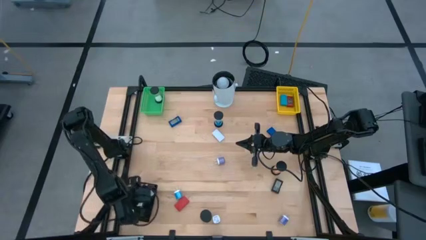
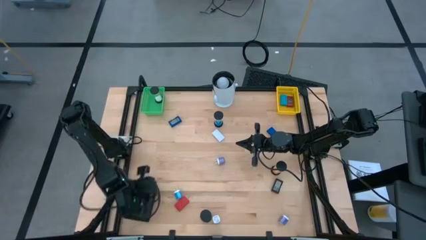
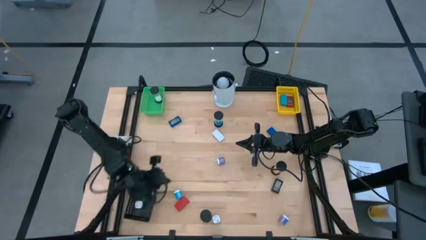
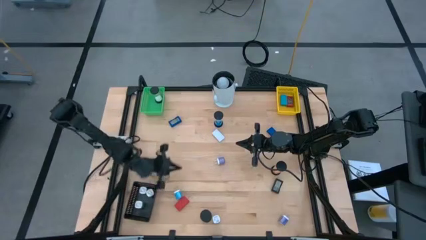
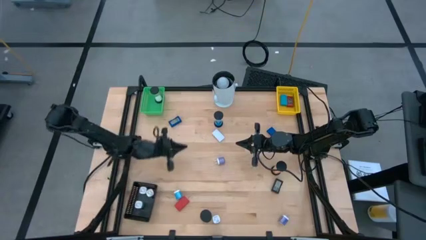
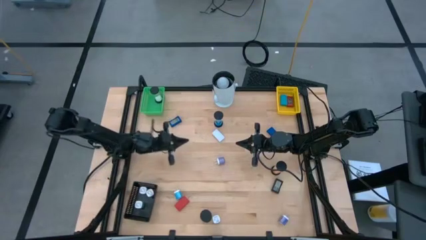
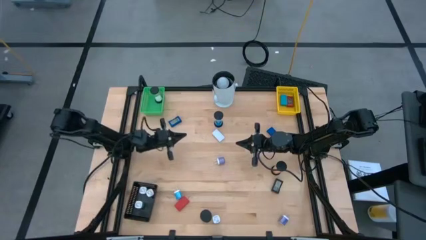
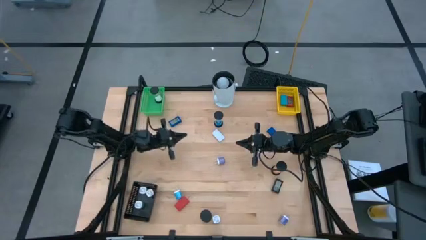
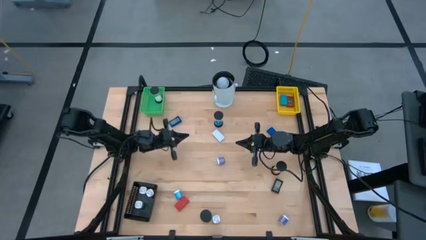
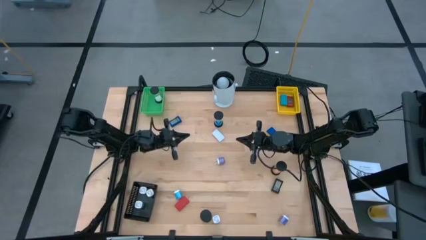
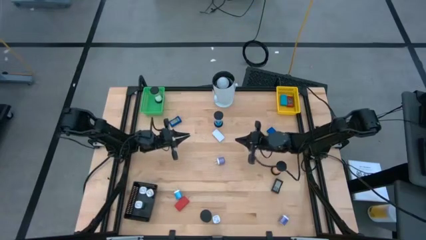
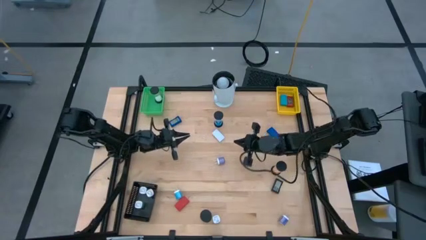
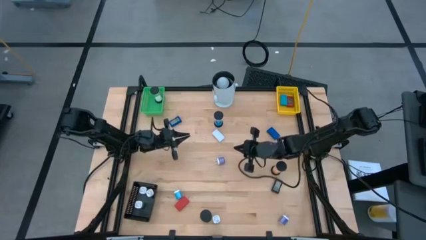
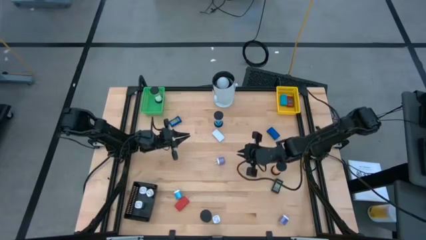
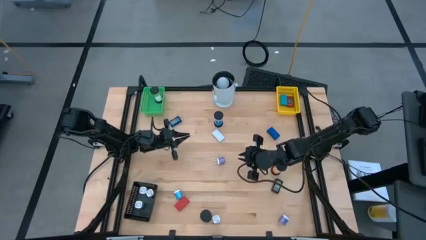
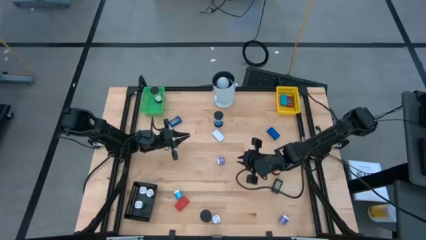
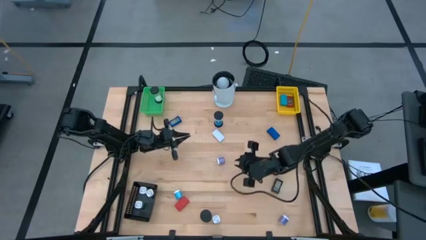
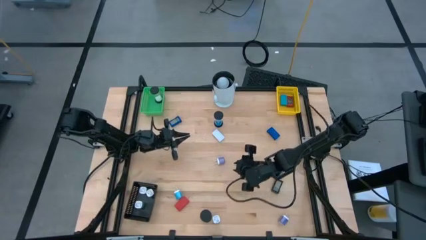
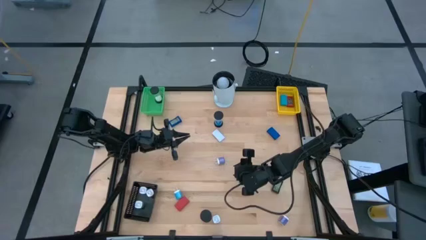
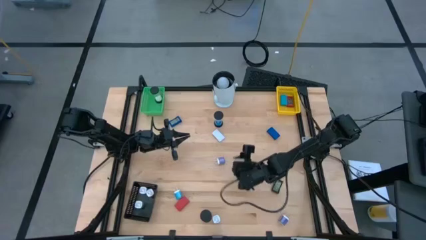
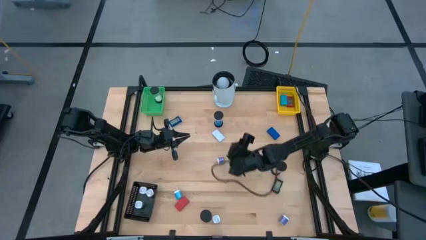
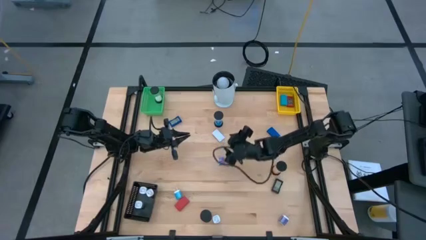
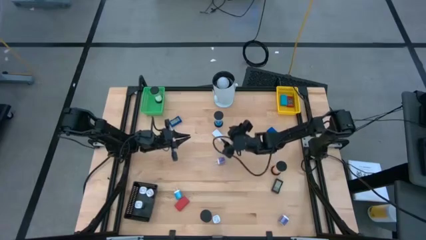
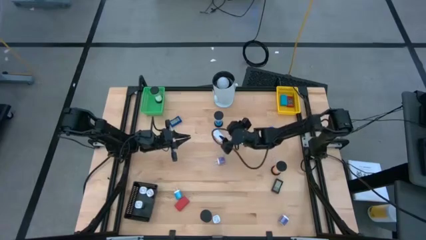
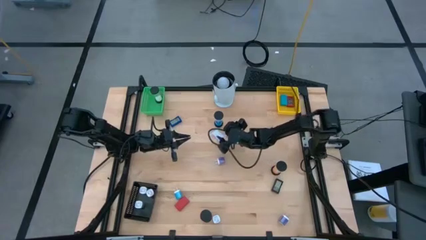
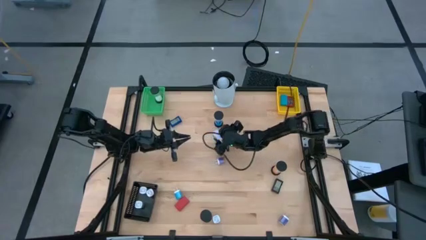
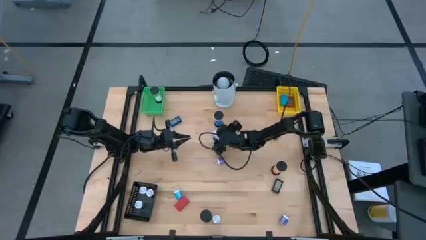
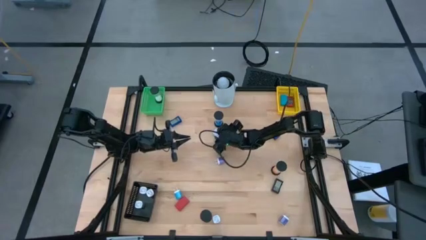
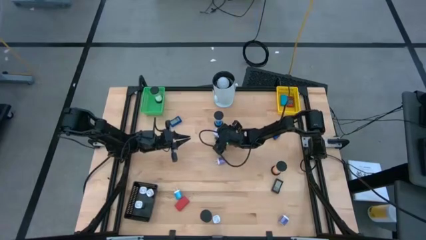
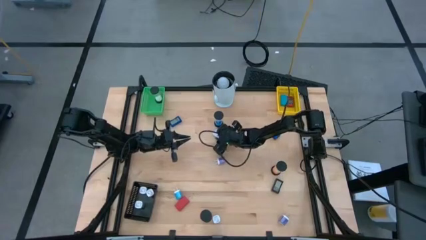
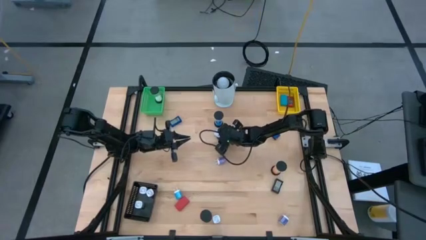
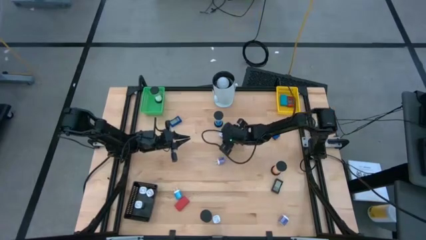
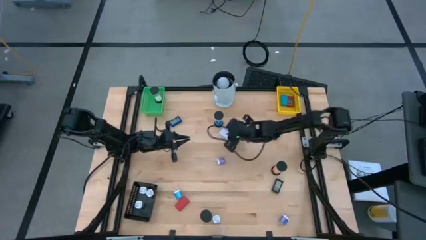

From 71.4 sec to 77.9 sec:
Task: Pick & Place Office items
Put the white digital clock into the yellow bin

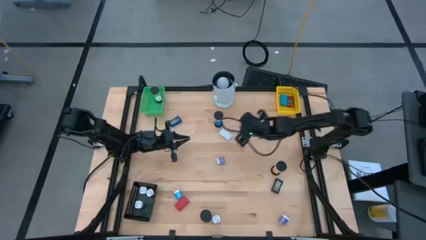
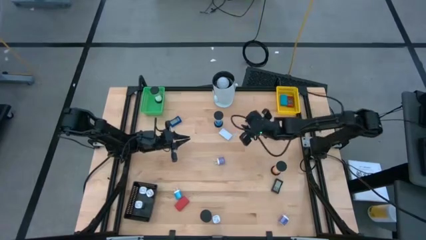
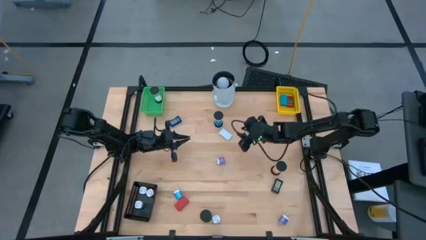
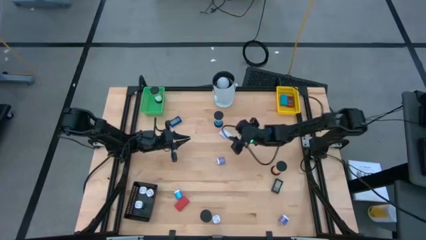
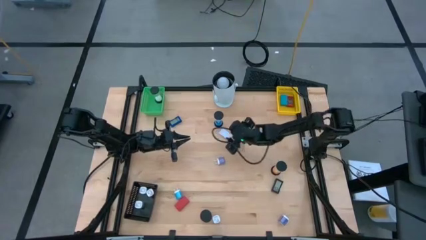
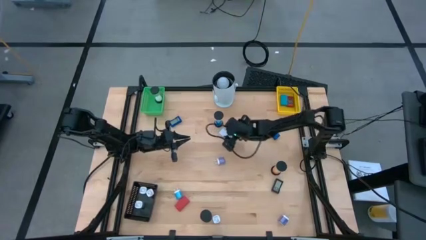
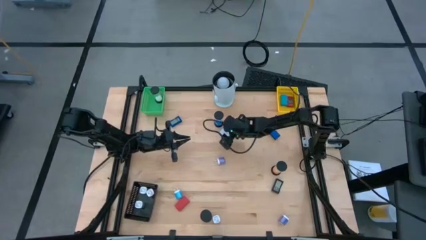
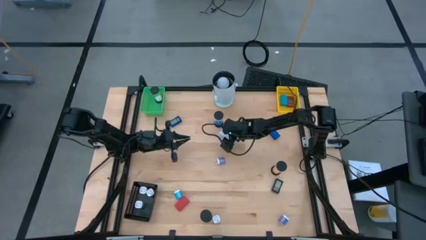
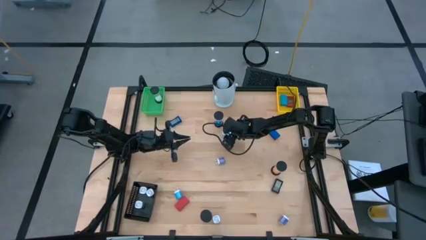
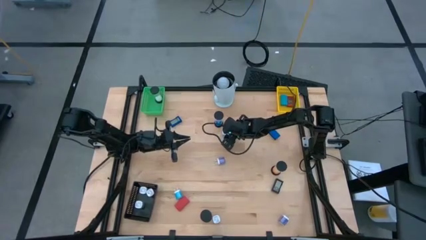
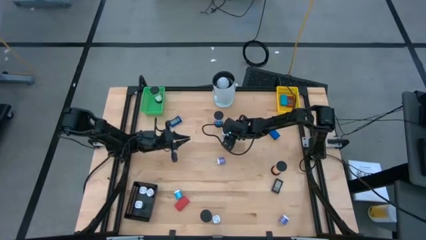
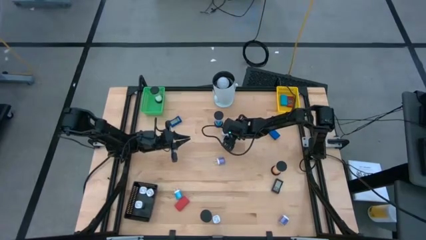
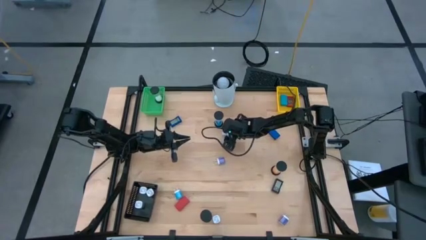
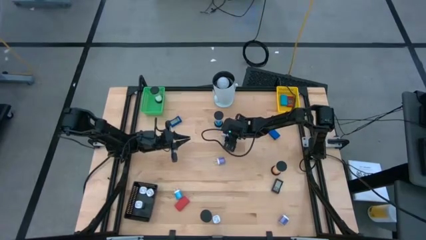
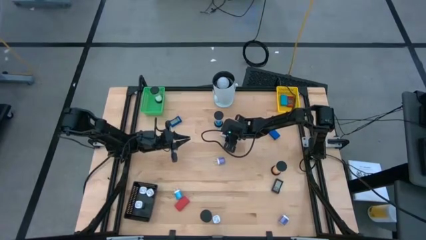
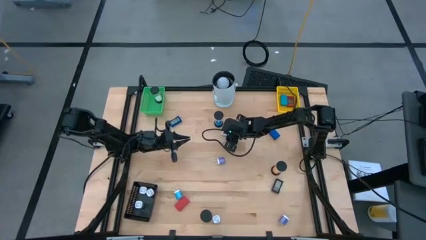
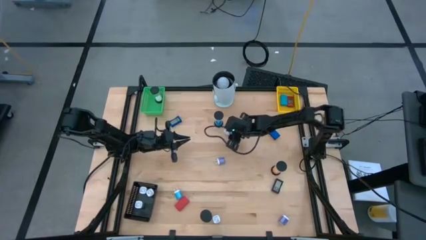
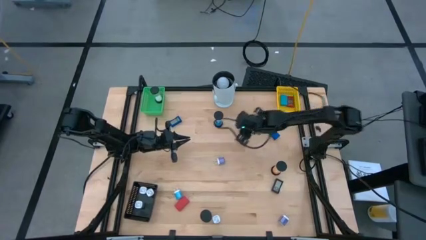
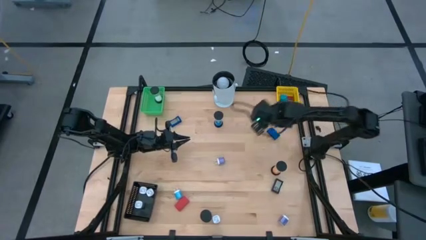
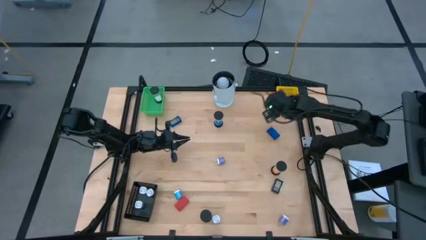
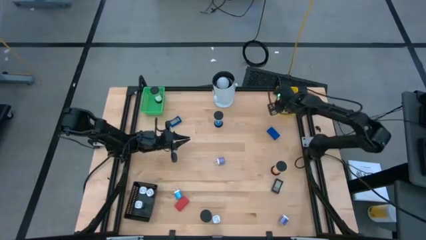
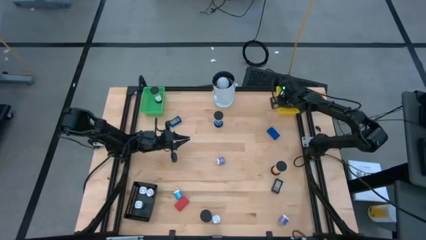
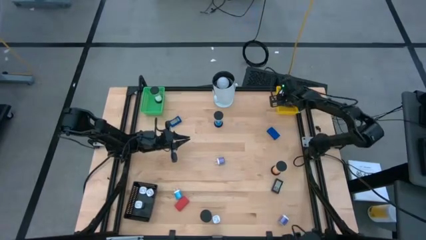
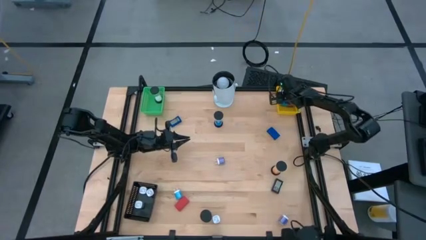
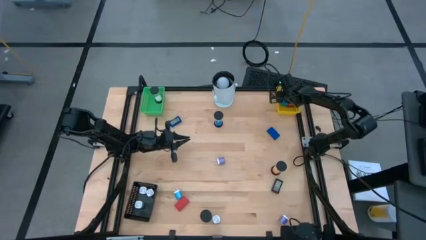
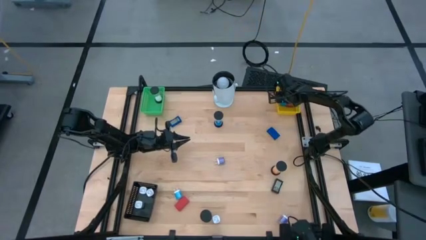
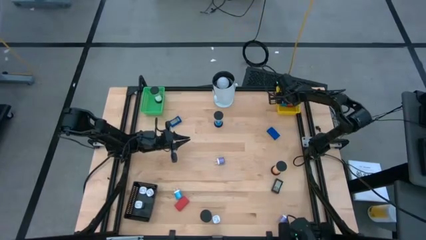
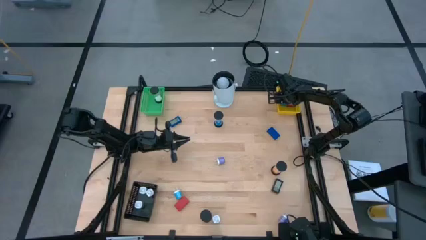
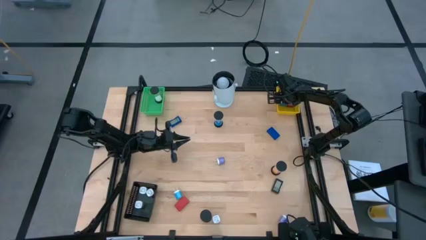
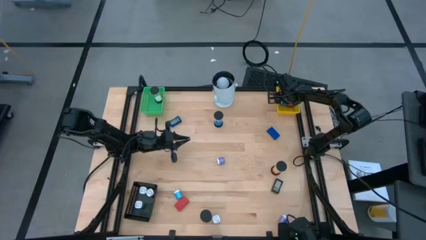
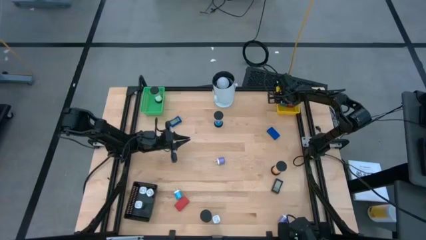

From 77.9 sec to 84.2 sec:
Put the white digital clock into the yellow bin
